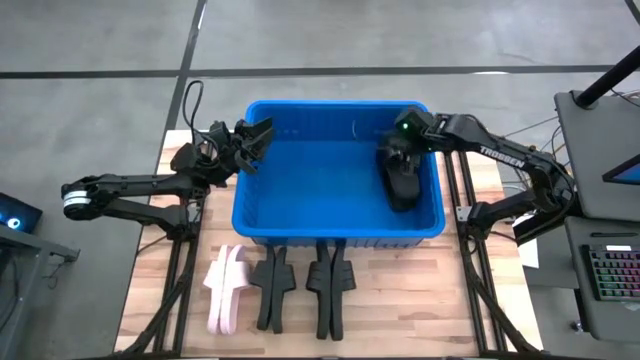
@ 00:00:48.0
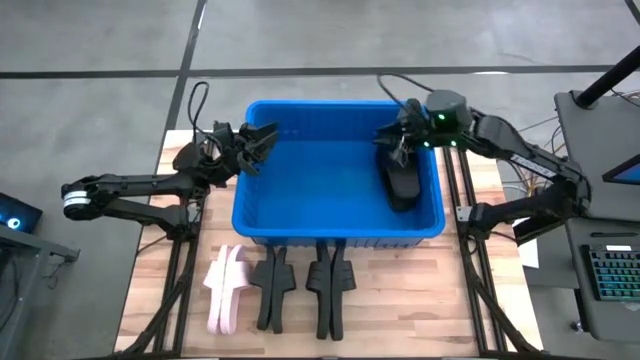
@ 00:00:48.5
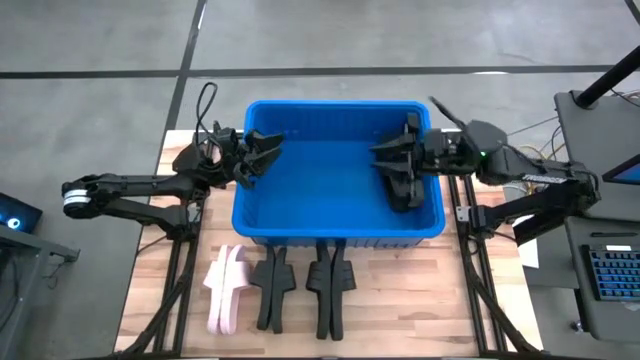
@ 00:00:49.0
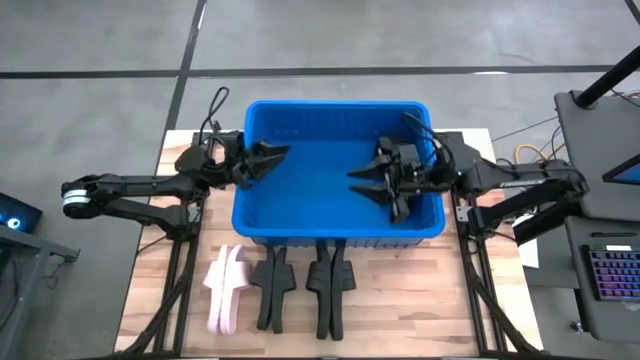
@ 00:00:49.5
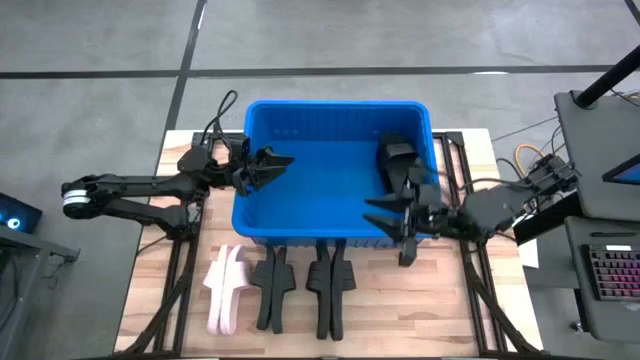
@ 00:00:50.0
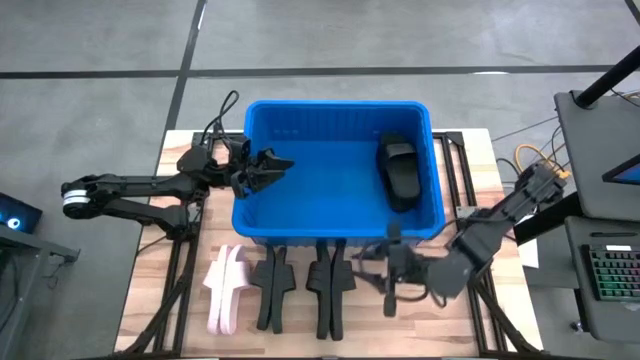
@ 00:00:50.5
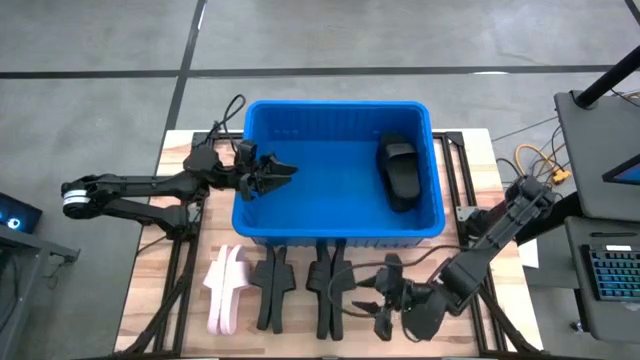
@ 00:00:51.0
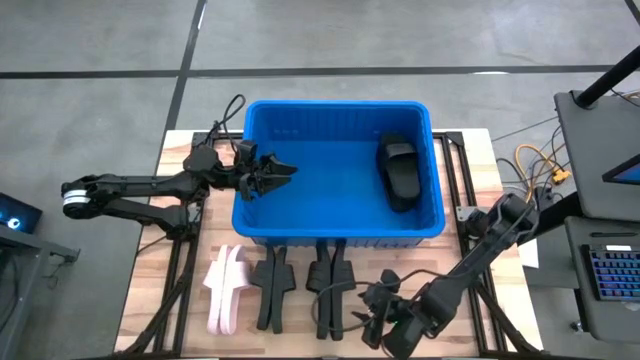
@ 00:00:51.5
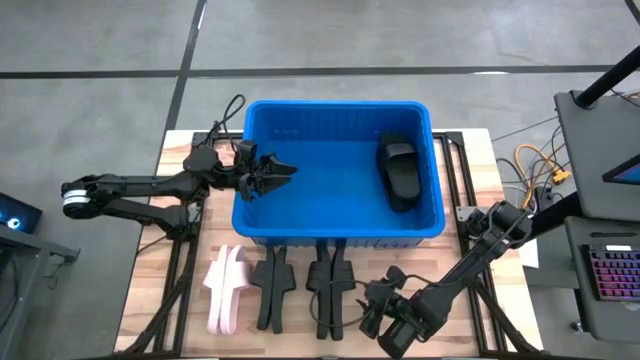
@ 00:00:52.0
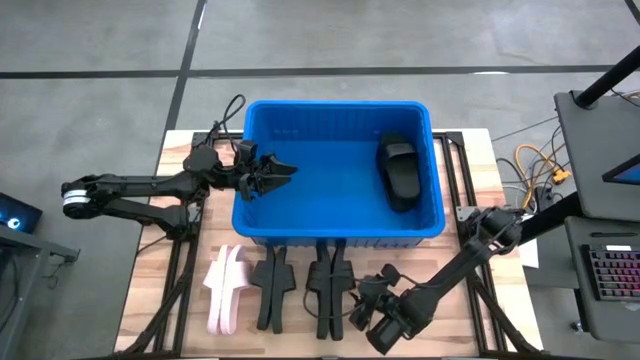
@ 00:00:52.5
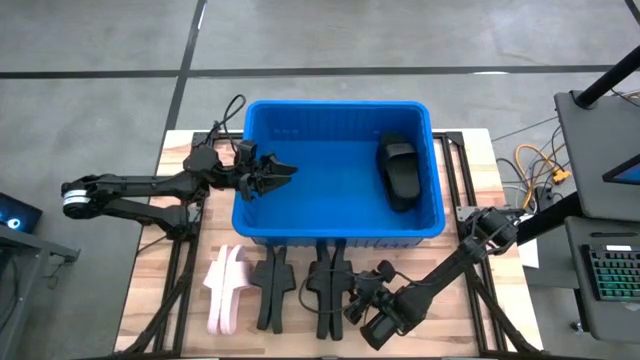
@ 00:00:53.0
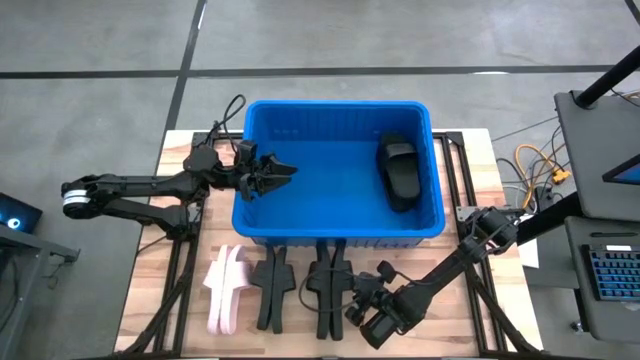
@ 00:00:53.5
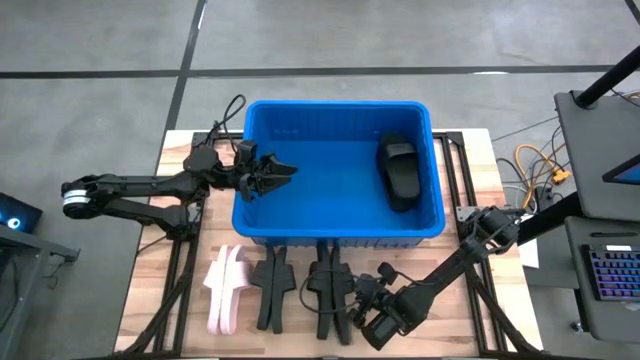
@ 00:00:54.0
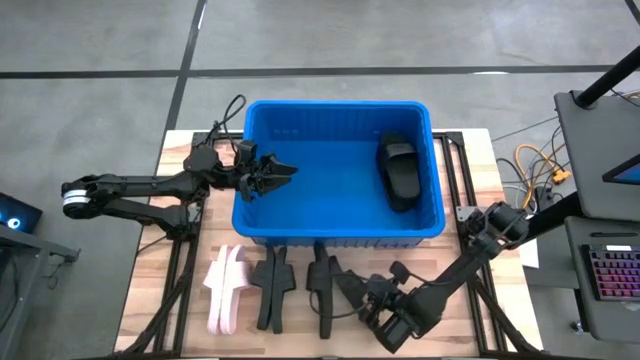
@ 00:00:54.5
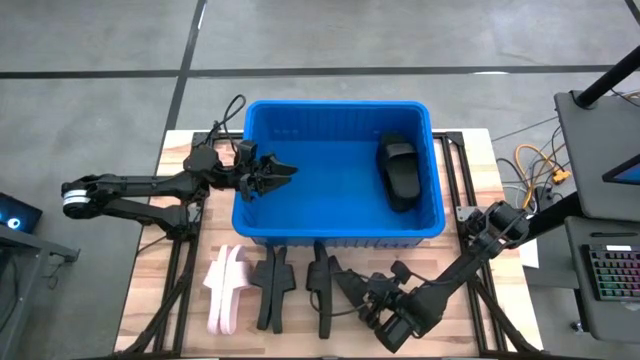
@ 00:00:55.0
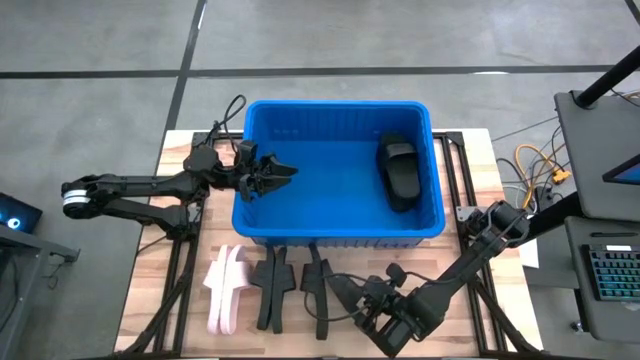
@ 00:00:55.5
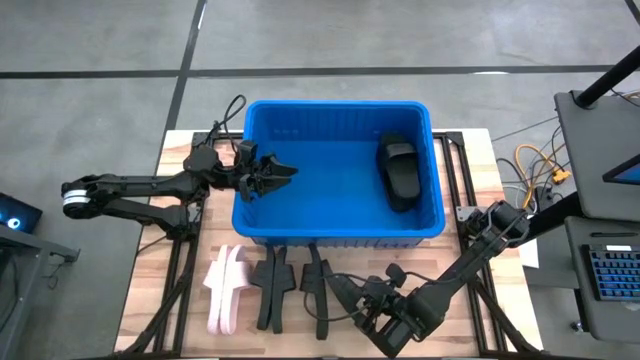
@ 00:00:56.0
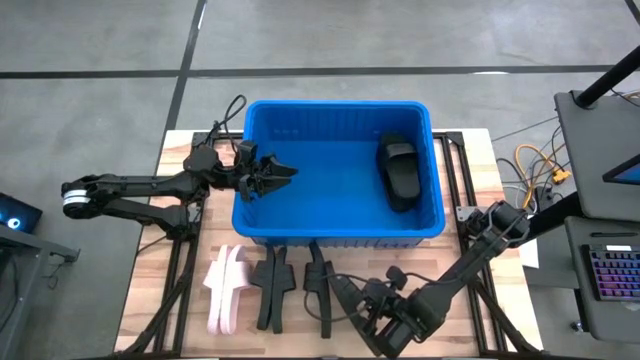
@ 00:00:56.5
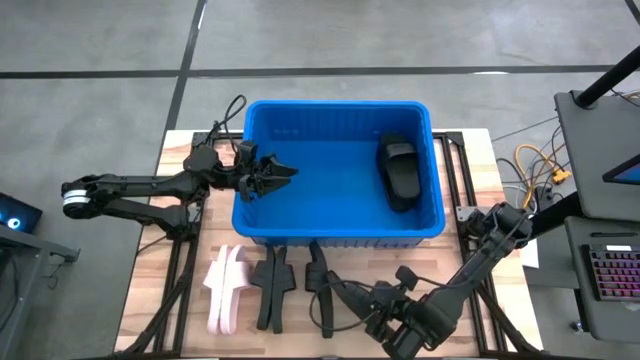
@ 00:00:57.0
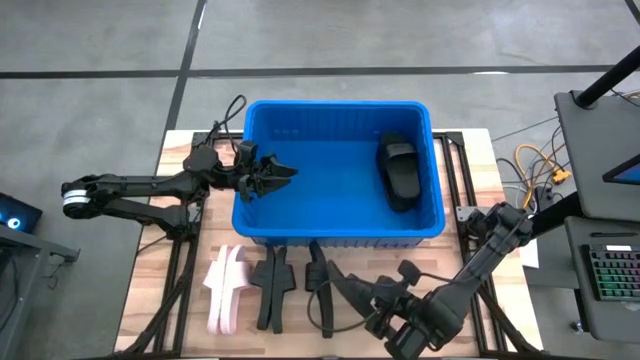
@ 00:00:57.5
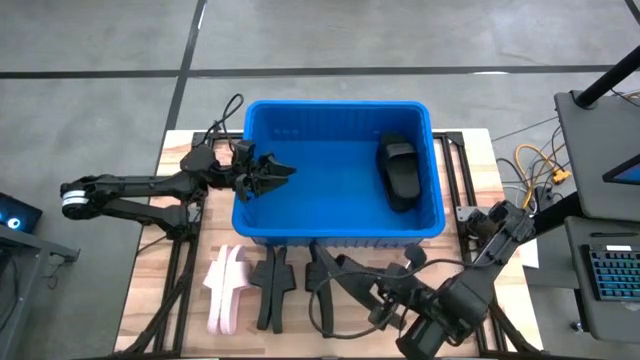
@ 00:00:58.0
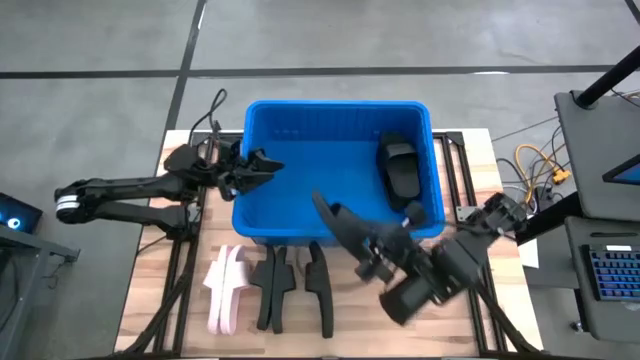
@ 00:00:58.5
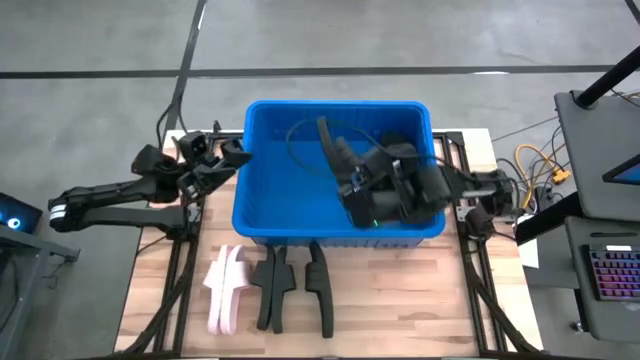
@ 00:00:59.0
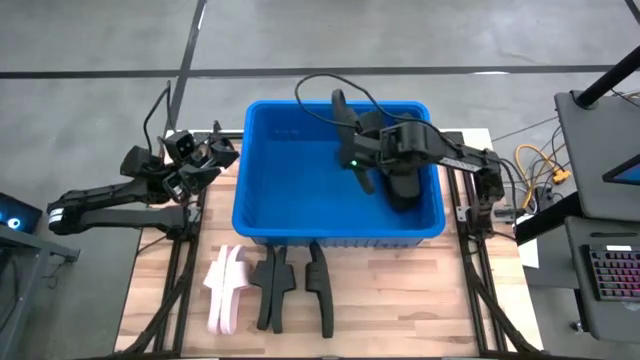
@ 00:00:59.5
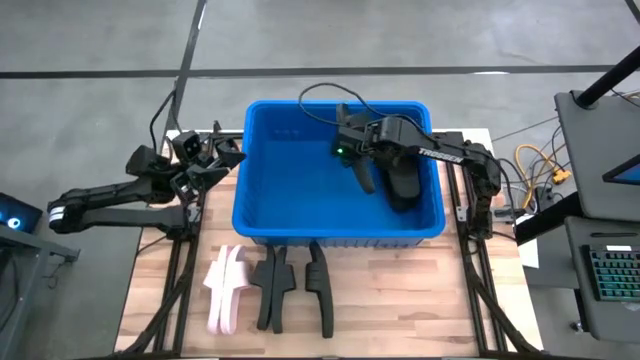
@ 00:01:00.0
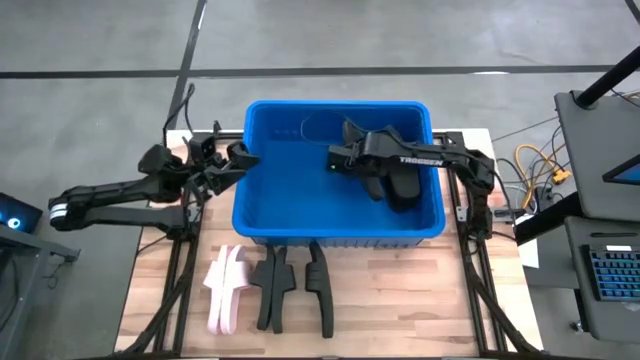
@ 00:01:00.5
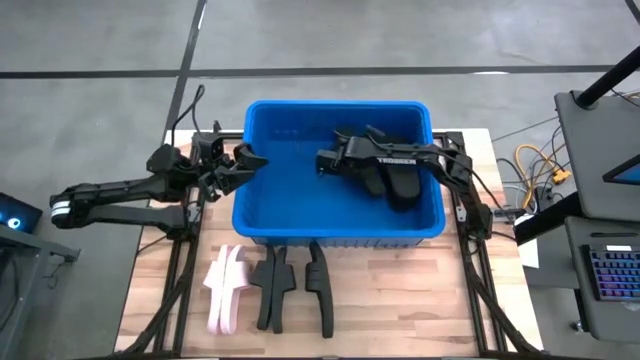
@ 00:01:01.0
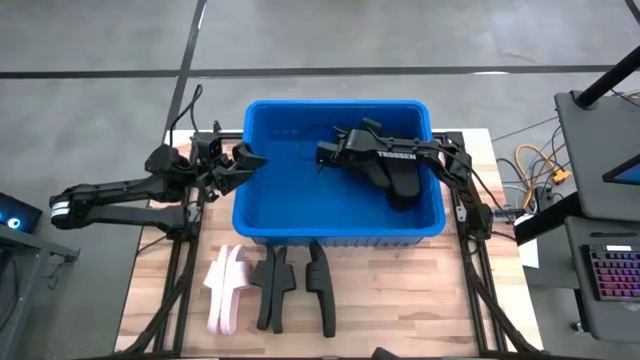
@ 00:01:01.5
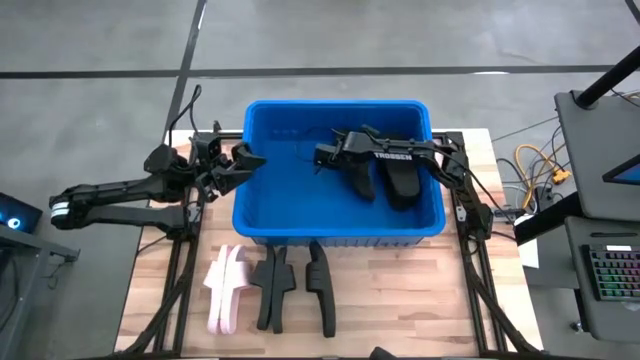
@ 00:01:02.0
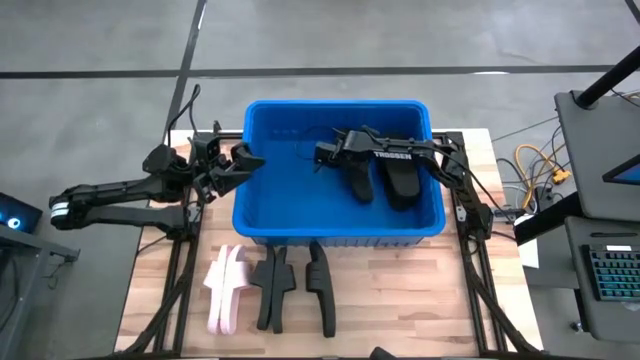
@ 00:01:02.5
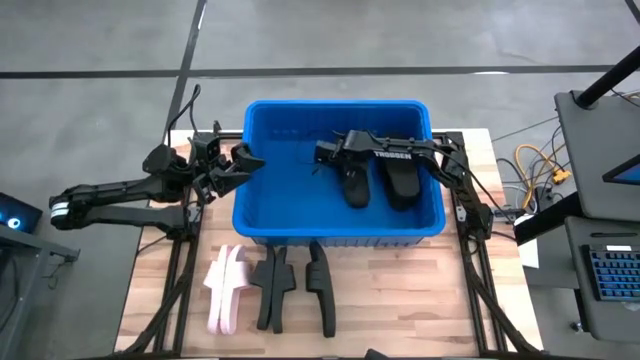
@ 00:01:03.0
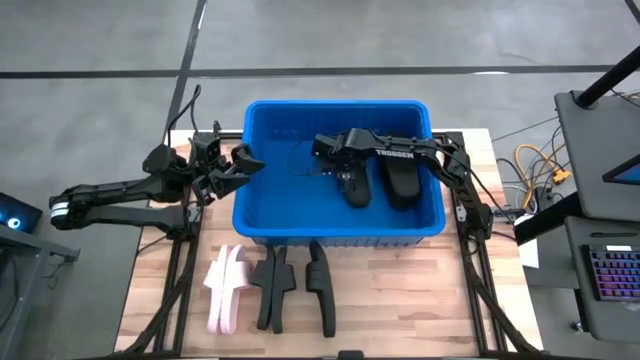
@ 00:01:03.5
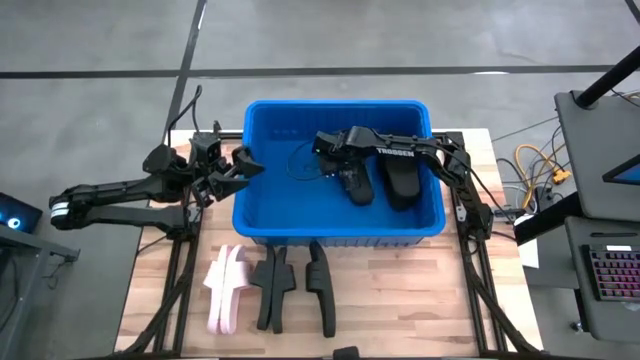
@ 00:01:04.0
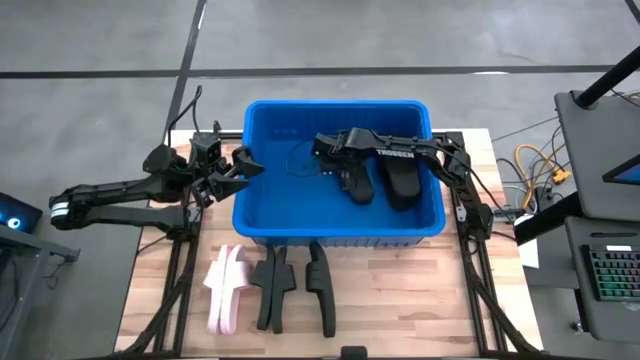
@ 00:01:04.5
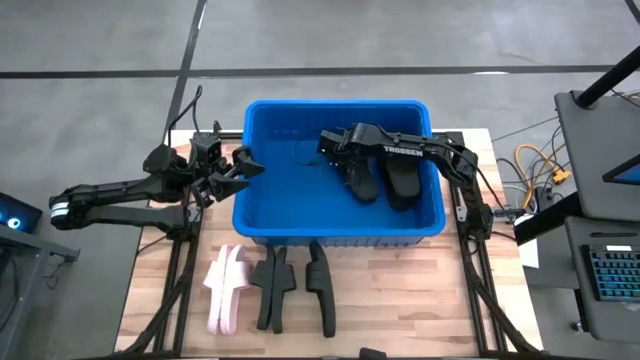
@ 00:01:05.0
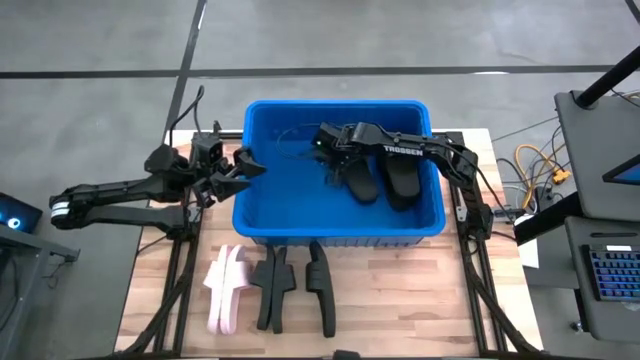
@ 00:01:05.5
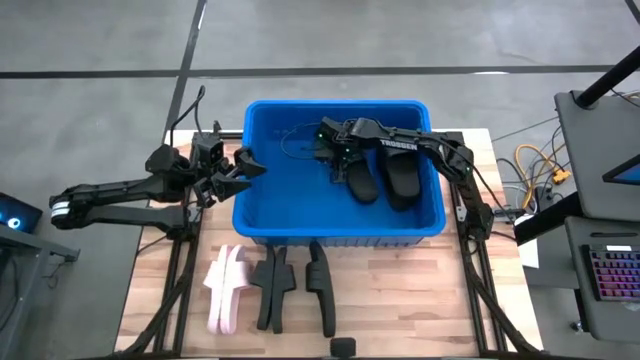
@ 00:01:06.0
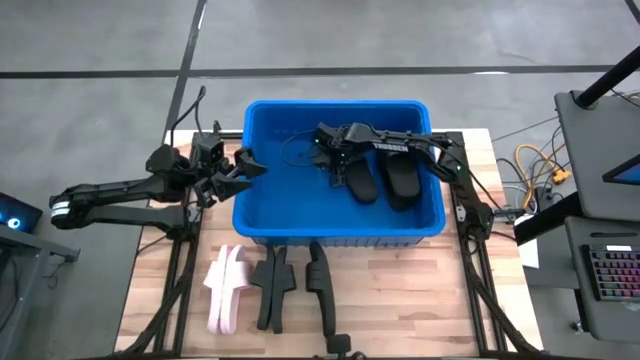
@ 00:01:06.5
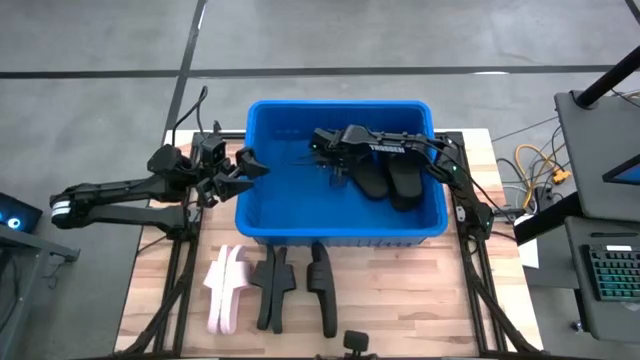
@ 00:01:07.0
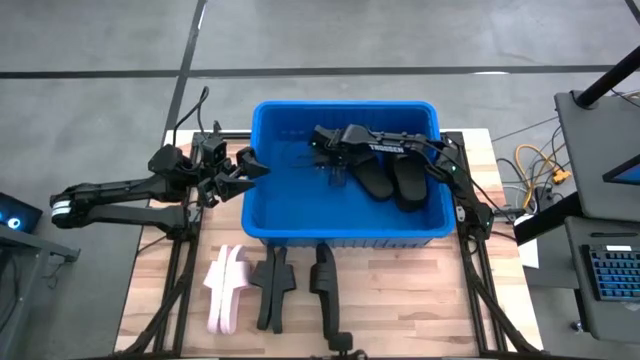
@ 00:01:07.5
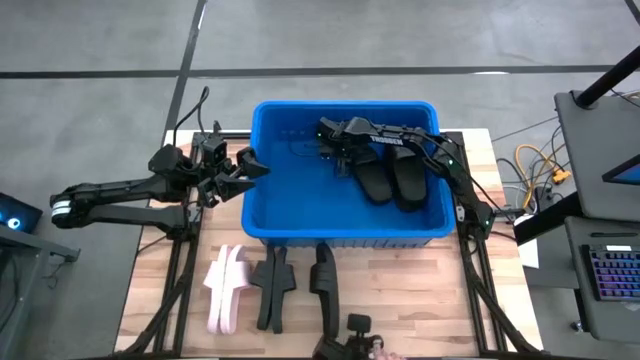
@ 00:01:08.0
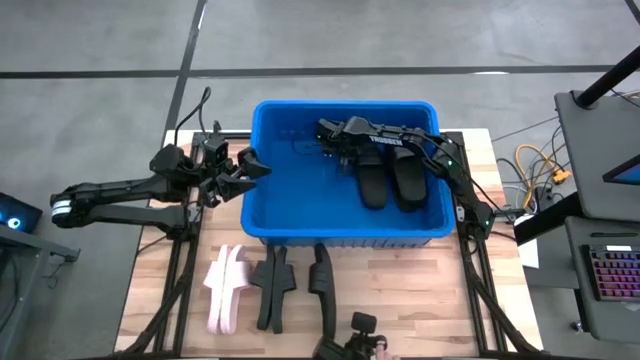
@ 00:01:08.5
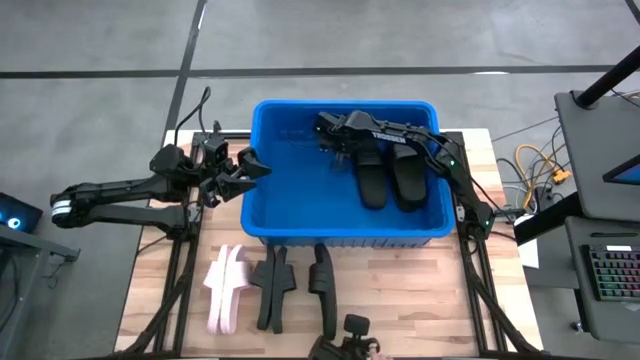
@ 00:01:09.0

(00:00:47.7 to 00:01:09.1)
Task: Pick and place slides into bin
Put the black slide into the bin
